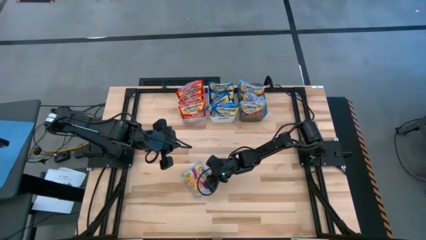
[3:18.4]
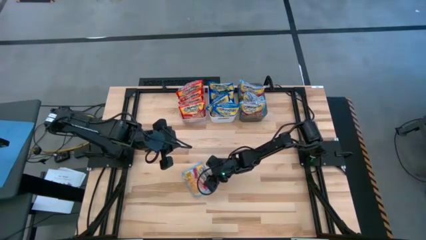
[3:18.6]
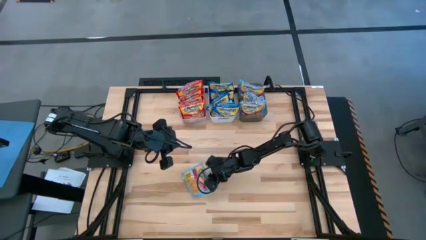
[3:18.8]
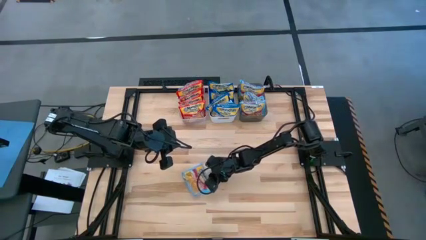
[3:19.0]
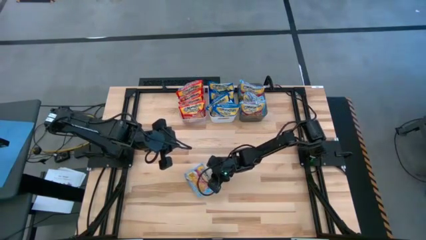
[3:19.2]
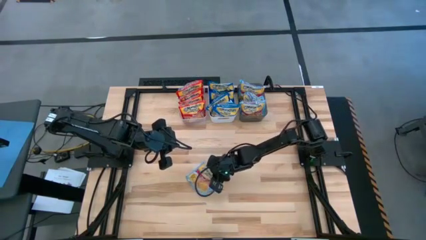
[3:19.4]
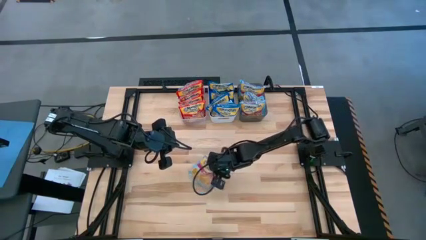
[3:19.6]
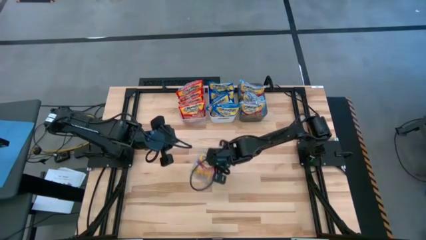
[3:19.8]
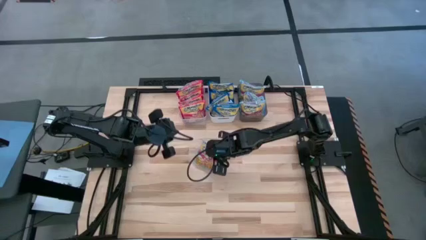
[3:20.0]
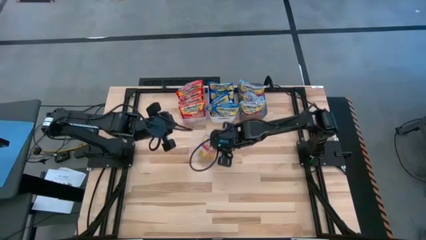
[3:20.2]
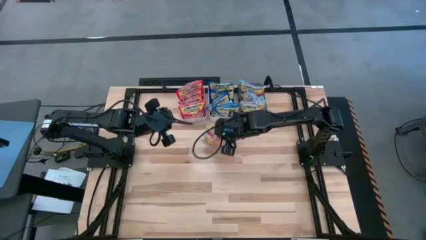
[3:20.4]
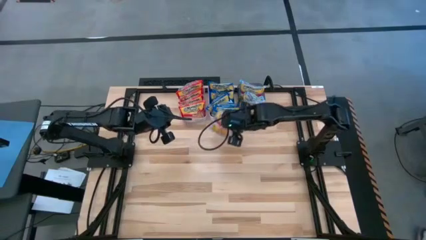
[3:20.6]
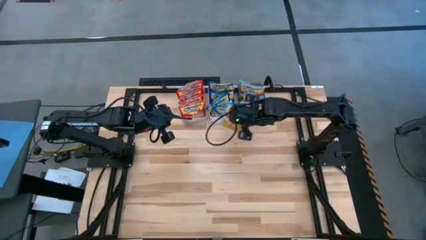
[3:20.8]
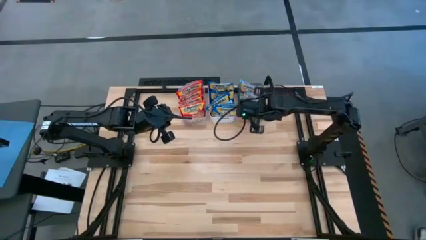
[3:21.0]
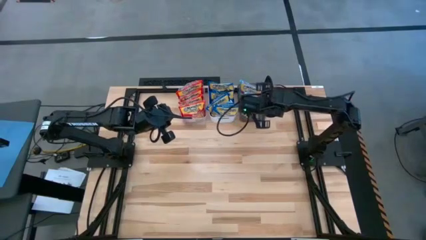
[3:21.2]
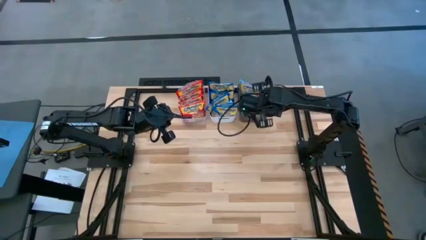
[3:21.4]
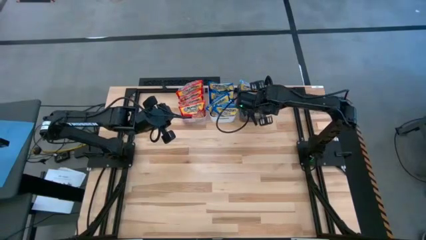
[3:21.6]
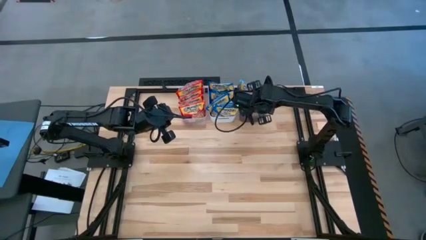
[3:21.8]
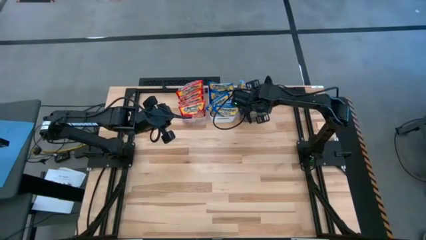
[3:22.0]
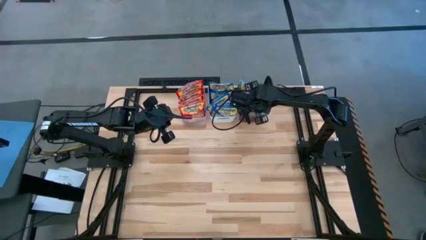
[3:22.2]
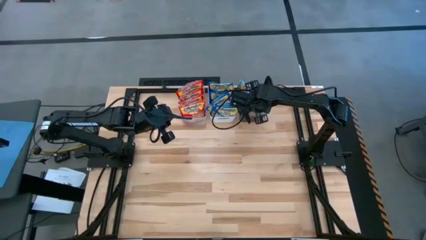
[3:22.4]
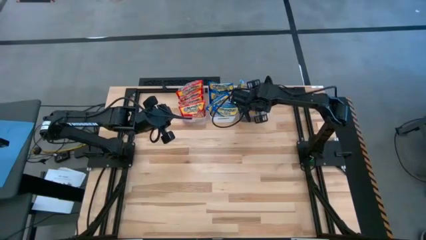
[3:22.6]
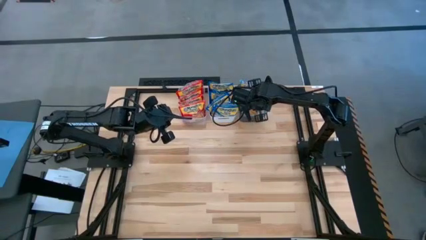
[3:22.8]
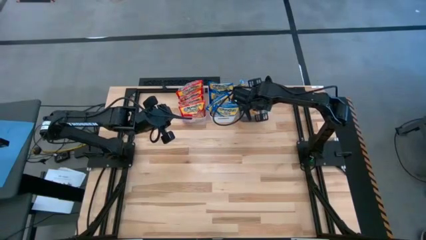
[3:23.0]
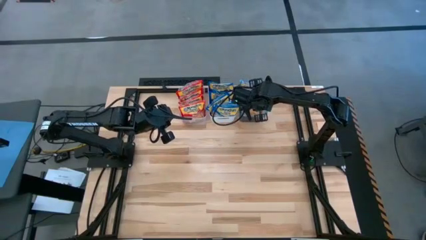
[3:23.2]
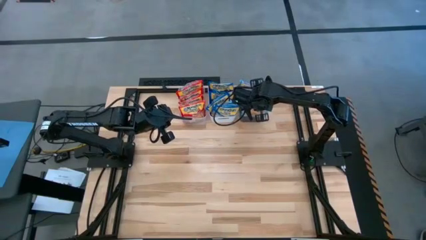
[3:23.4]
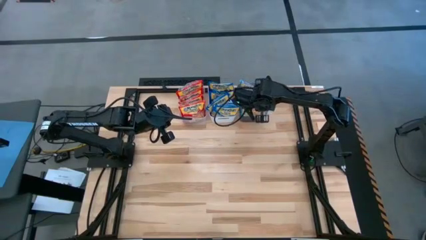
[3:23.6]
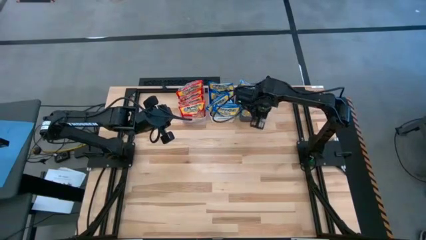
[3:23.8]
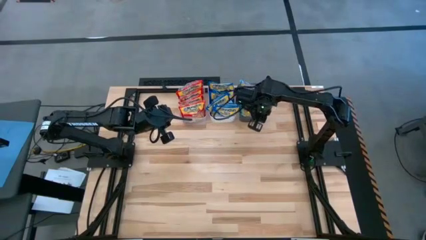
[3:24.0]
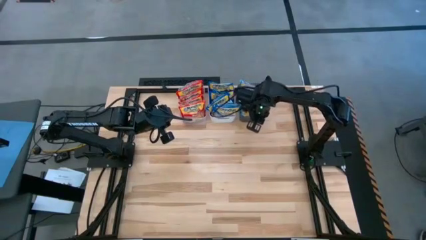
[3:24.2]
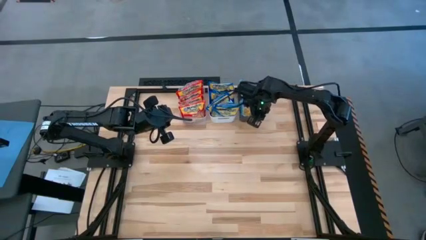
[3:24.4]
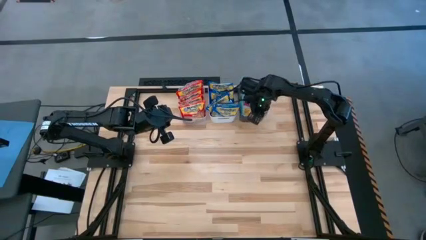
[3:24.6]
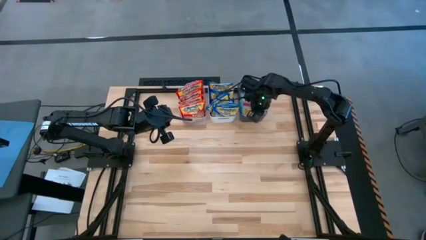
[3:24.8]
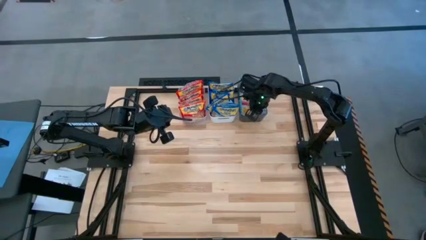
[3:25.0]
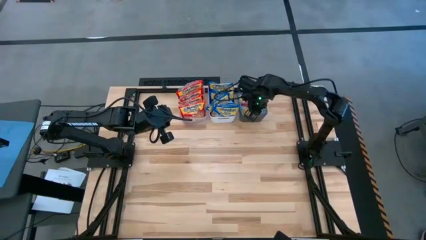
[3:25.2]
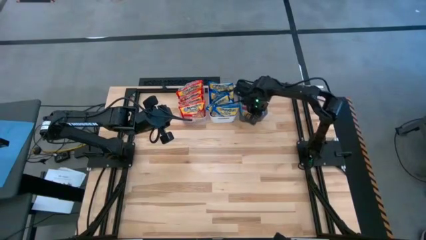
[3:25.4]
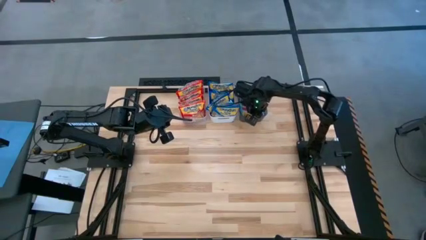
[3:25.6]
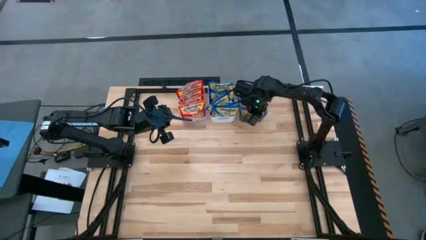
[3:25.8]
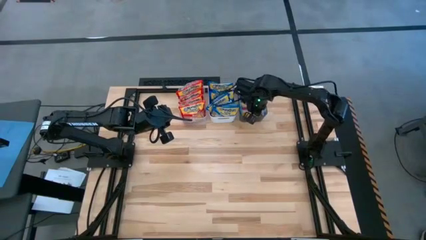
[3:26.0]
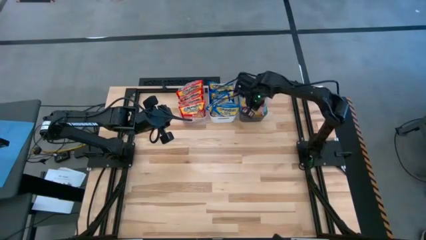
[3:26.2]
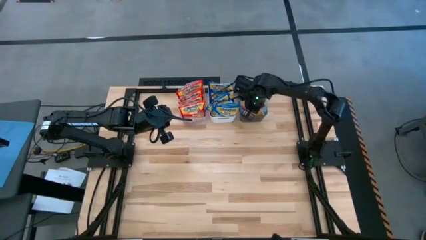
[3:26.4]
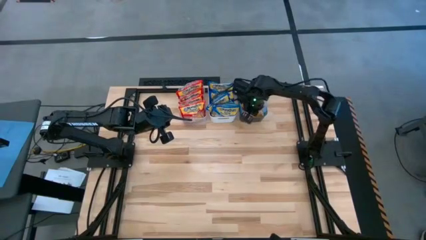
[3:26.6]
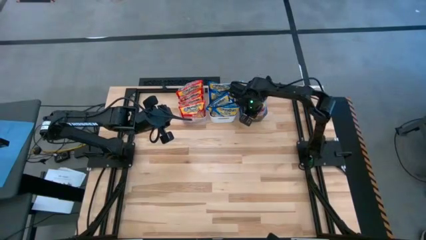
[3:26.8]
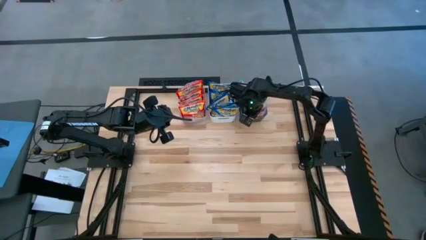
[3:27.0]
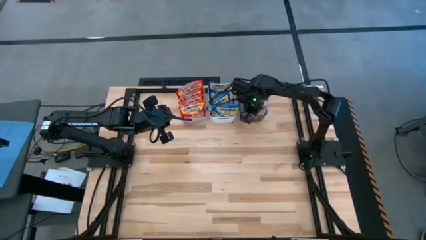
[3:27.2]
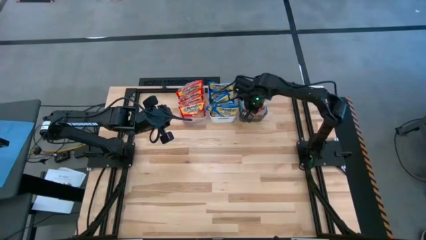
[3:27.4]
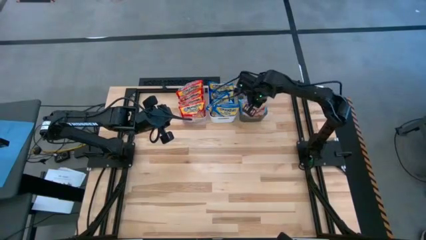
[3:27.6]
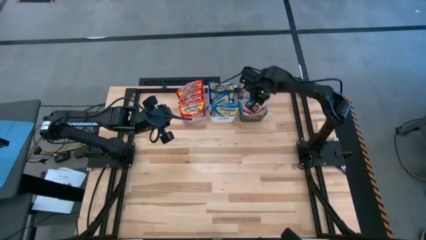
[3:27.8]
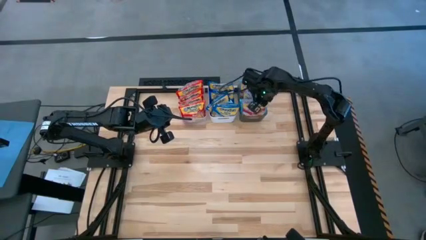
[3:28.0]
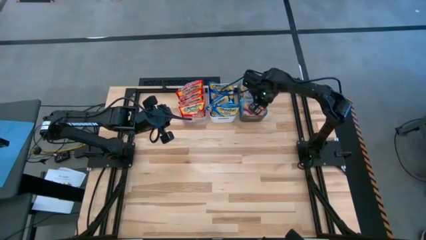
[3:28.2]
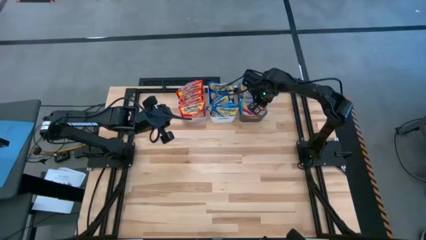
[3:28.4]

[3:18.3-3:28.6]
Task: Sort Maruchan noodles
Put the light blue noodle pack into the black bin

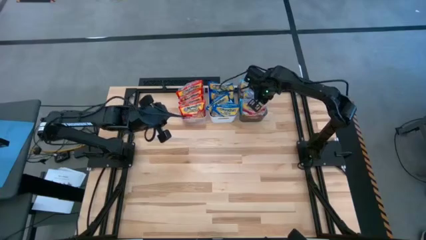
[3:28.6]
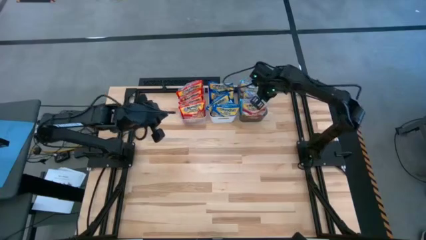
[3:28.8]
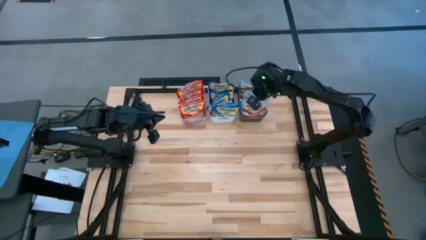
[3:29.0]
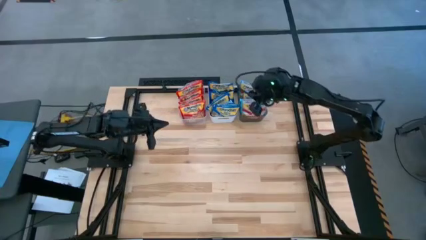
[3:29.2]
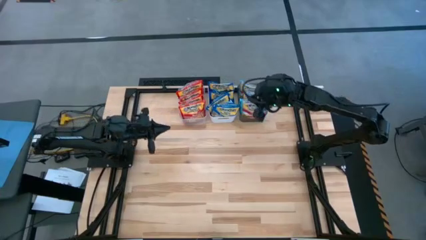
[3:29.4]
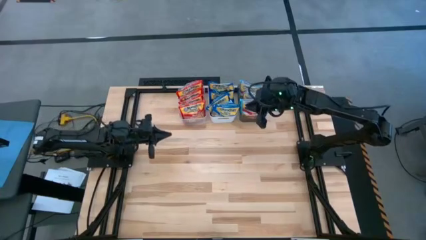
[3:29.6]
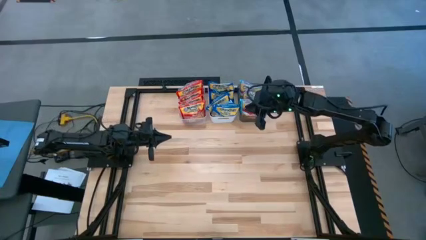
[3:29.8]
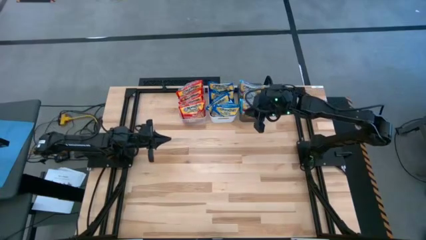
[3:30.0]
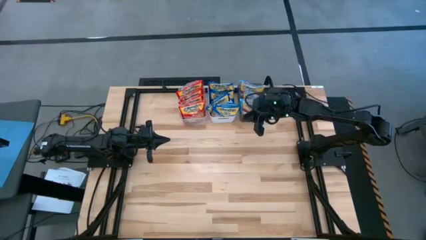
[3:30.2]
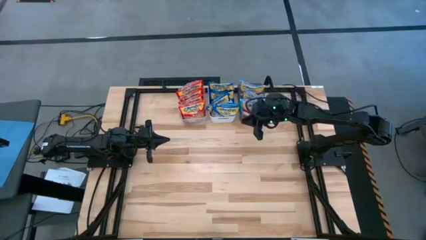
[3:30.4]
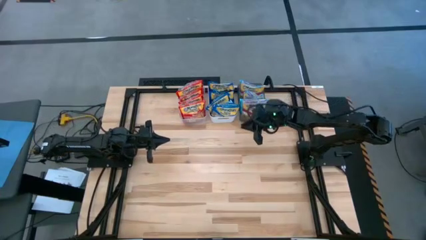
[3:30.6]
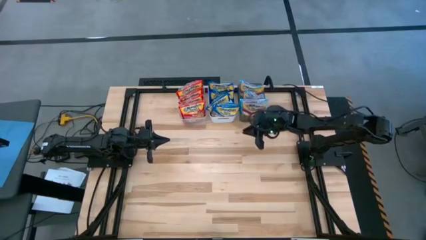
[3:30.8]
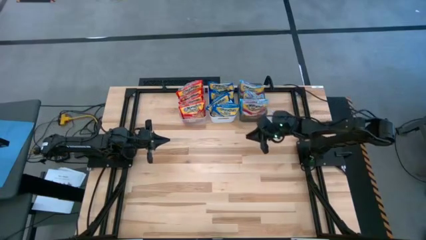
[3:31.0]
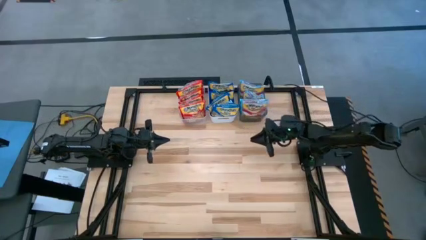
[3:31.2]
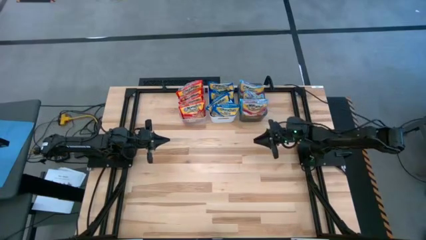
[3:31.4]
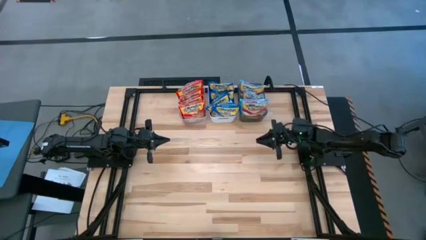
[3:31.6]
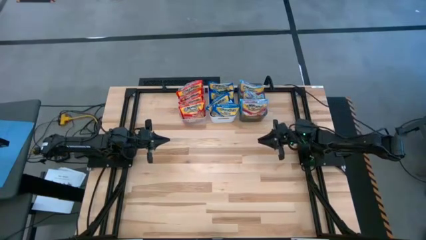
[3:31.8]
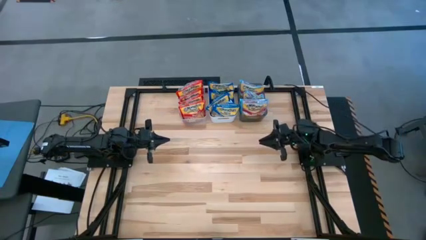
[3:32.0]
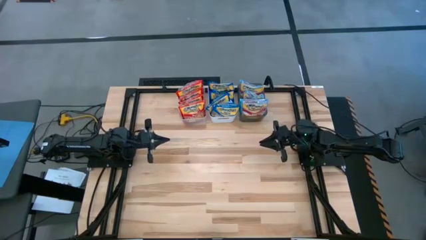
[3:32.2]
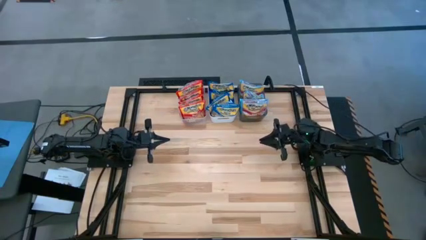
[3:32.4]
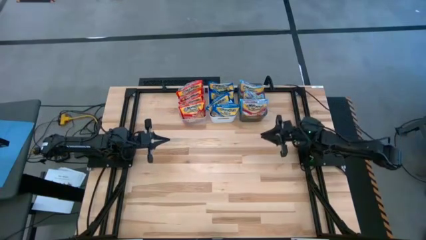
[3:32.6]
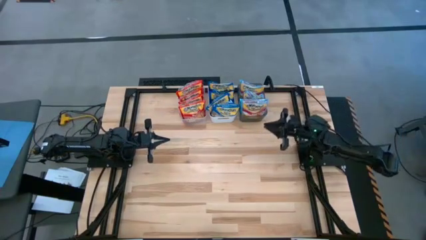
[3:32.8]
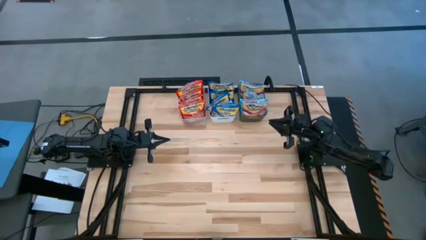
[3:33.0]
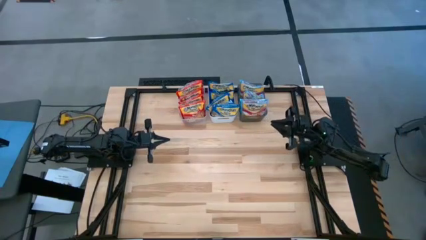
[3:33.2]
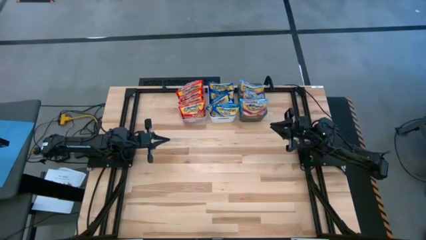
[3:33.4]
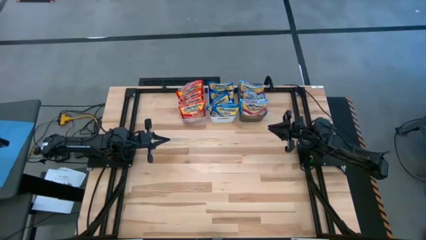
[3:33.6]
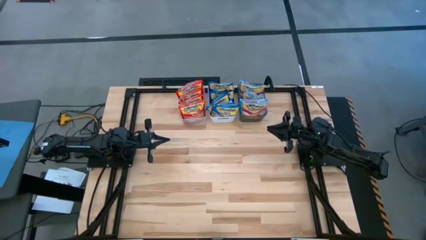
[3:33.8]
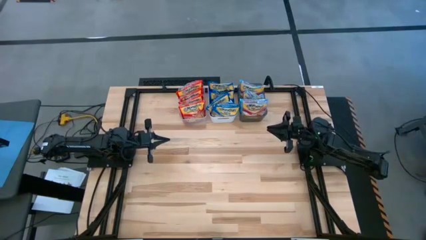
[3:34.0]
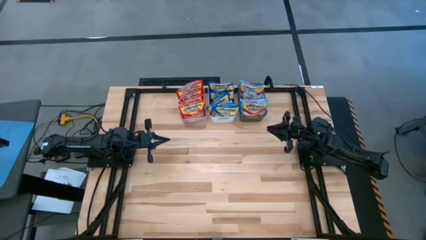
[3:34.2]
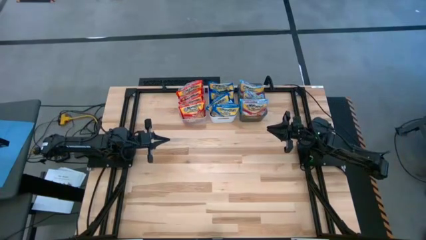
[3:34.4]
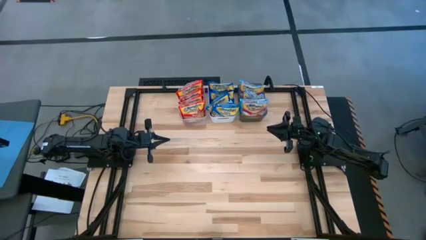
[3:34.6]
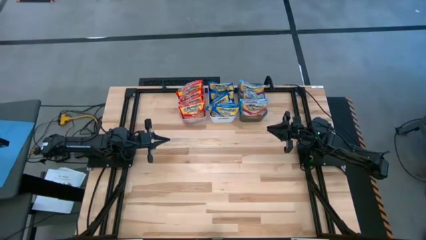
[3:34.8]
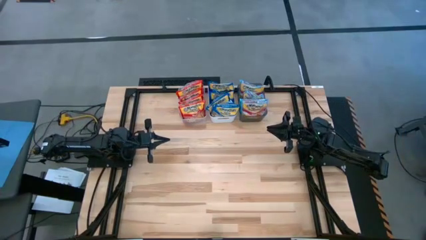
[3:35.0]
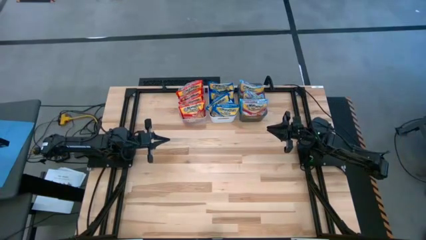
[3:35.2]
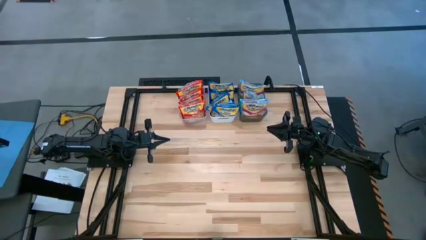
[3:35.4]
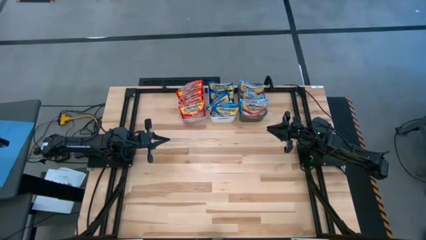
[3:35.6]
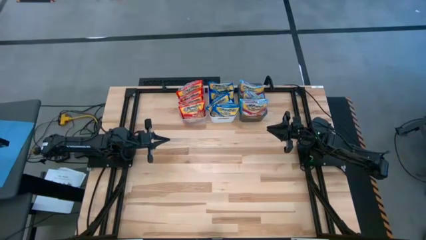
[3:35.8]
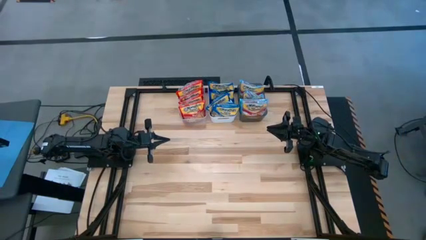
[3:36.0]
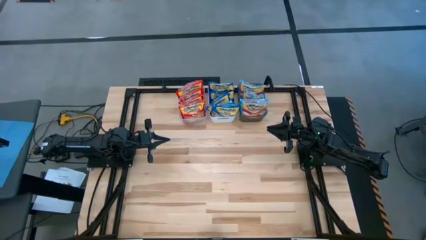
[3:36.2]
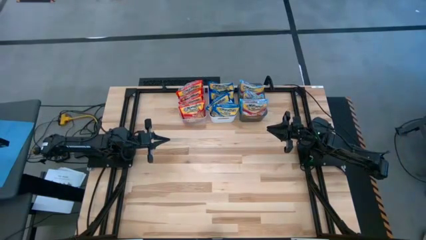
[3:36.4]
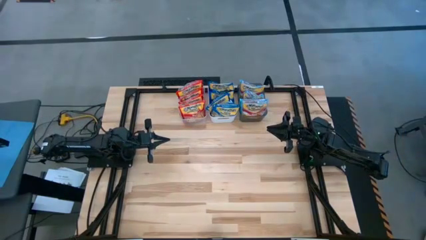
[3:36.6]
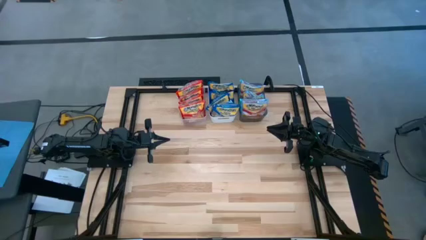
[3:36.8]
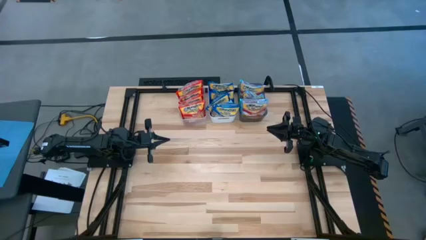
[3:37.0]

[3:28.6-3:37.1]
Return to Home Position
